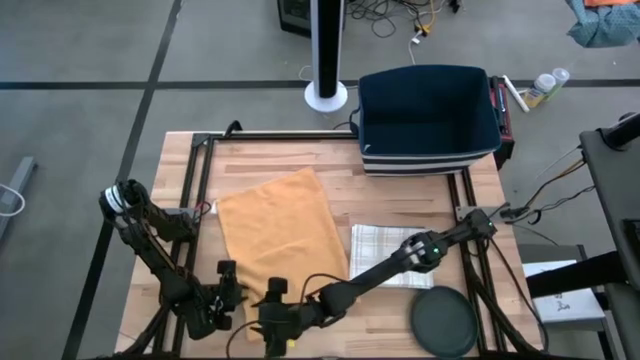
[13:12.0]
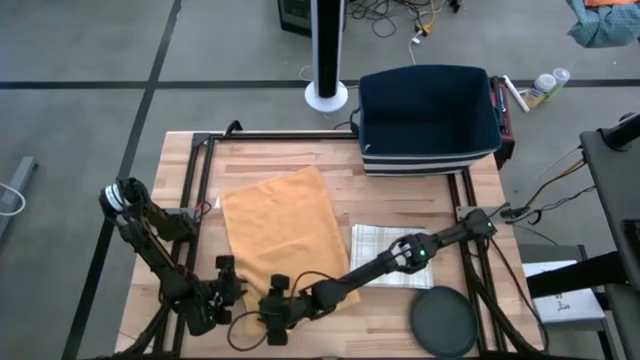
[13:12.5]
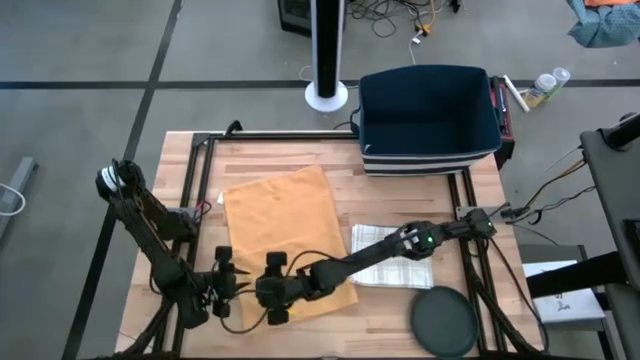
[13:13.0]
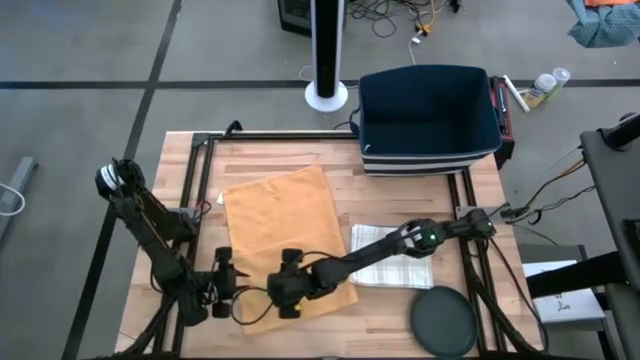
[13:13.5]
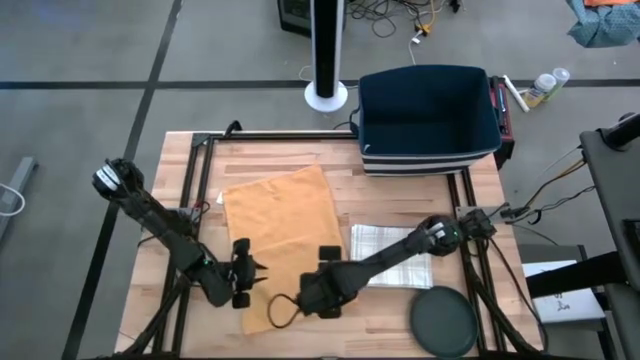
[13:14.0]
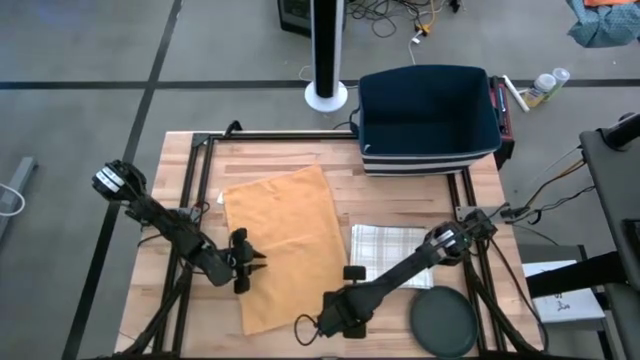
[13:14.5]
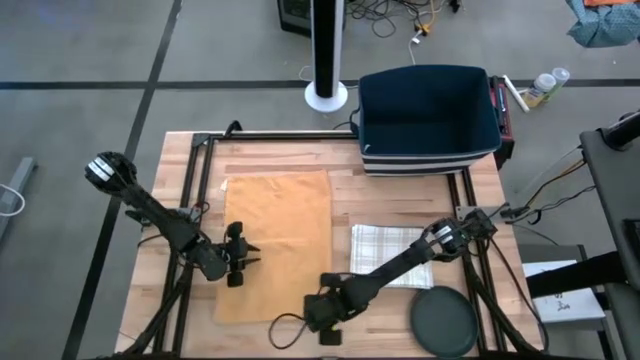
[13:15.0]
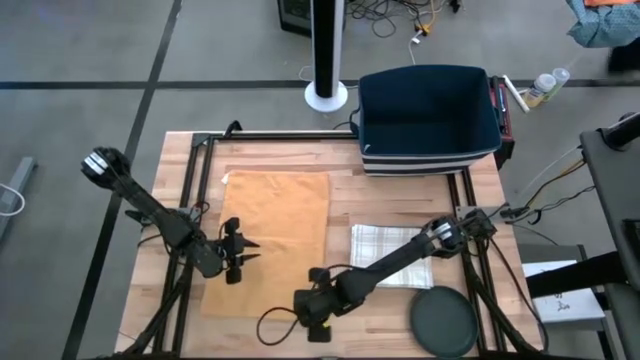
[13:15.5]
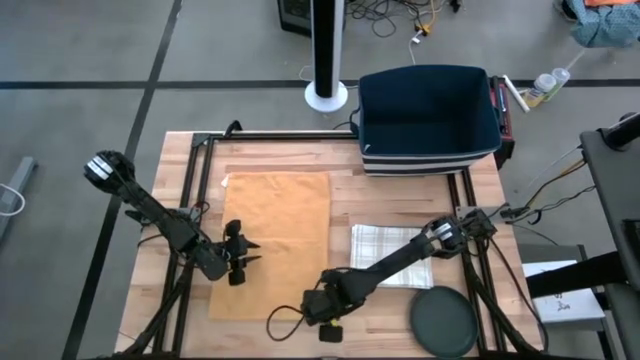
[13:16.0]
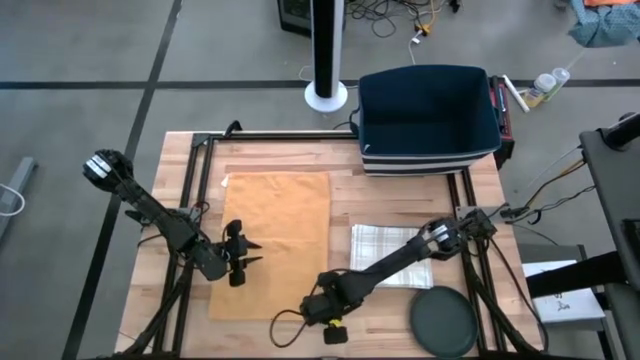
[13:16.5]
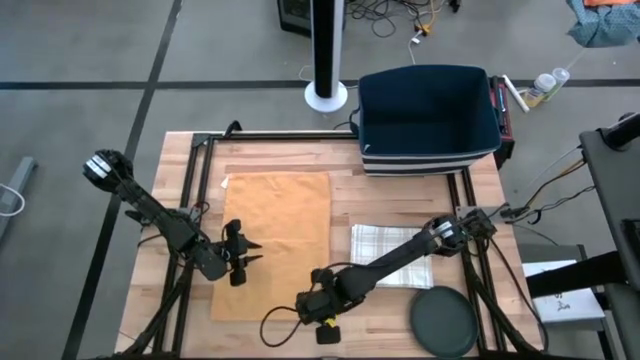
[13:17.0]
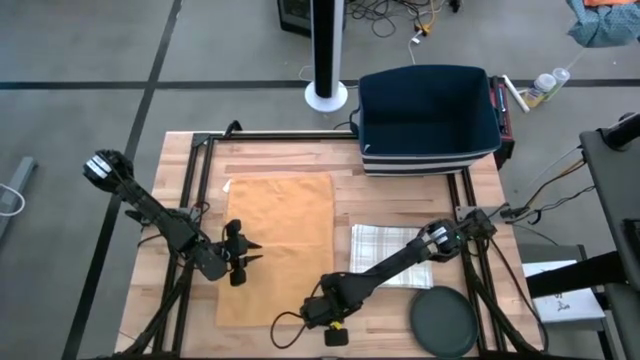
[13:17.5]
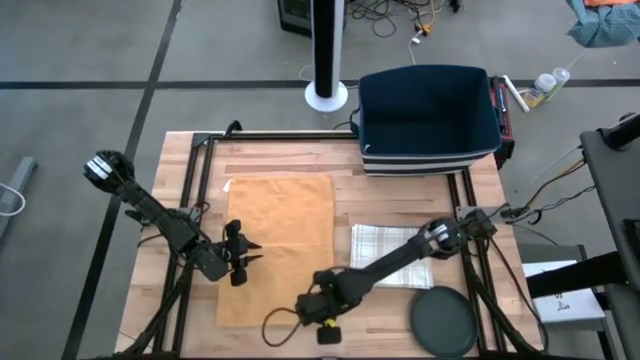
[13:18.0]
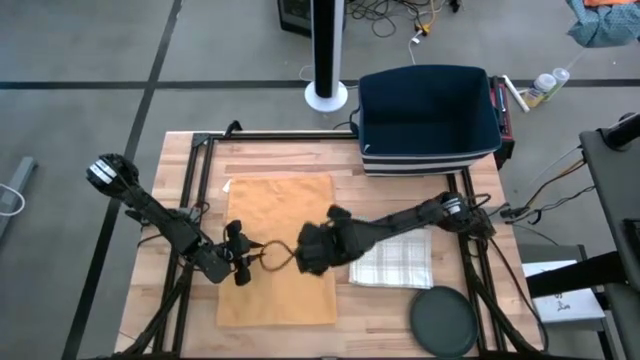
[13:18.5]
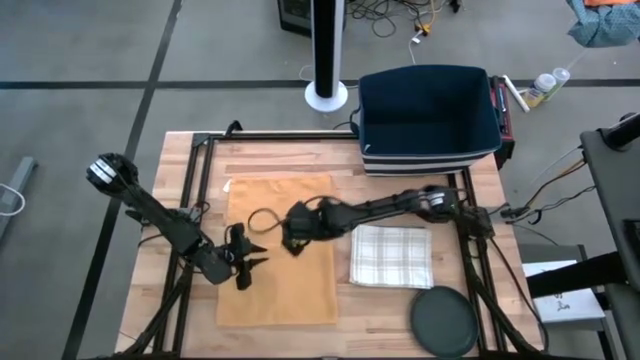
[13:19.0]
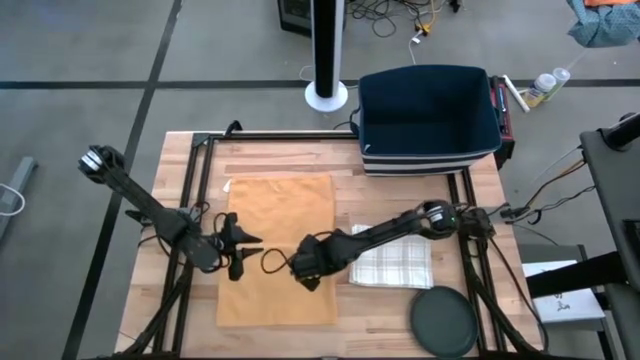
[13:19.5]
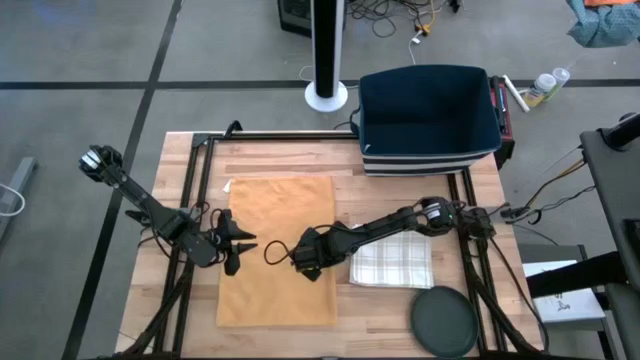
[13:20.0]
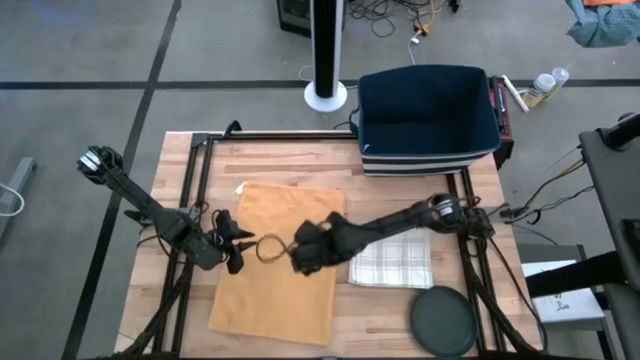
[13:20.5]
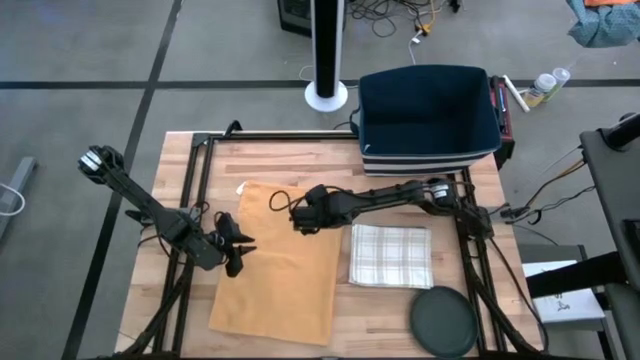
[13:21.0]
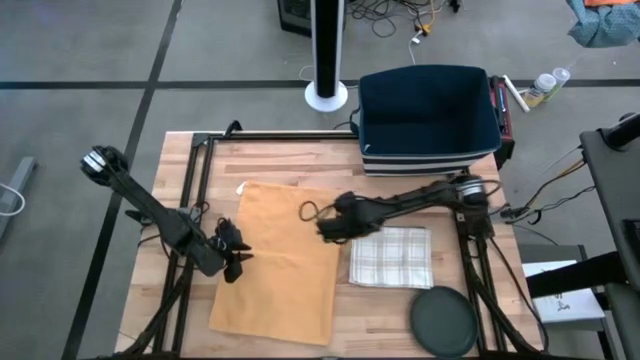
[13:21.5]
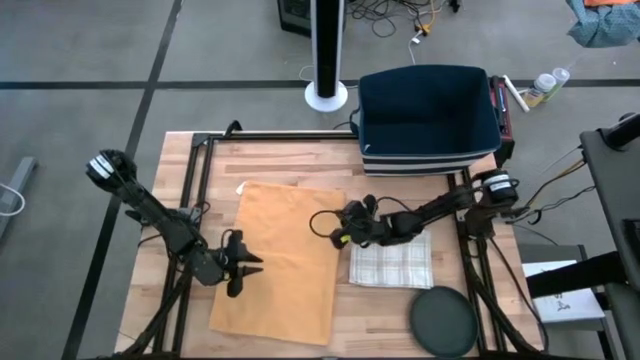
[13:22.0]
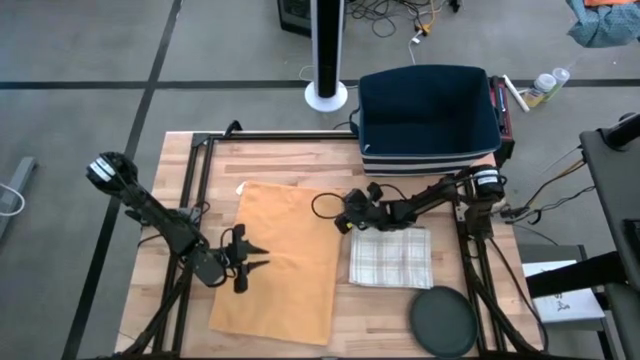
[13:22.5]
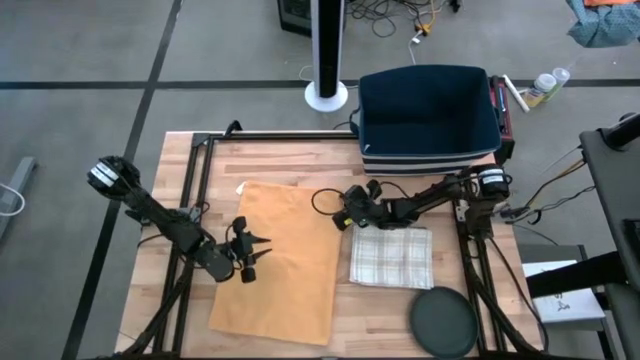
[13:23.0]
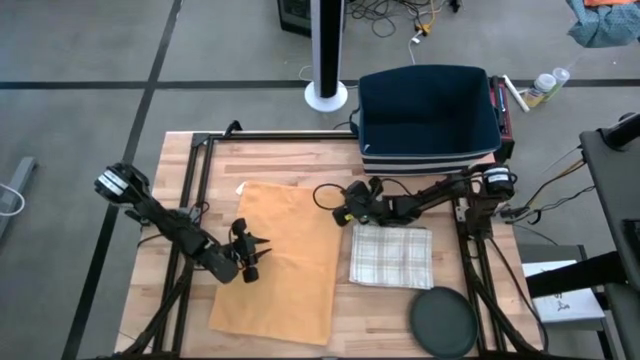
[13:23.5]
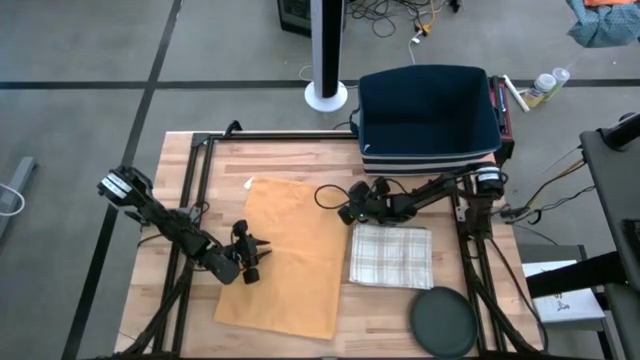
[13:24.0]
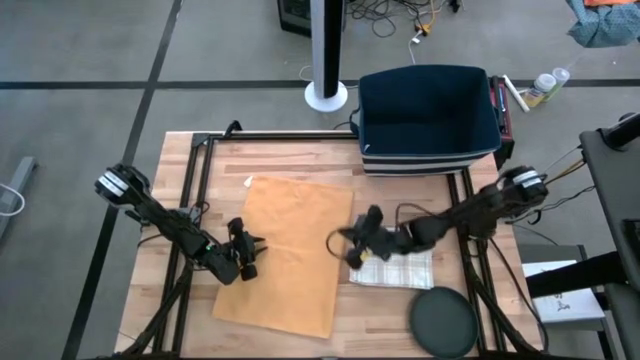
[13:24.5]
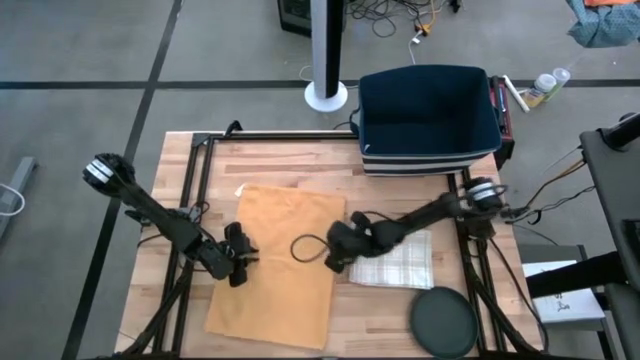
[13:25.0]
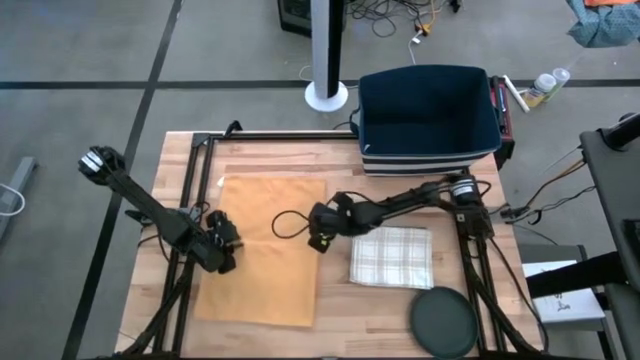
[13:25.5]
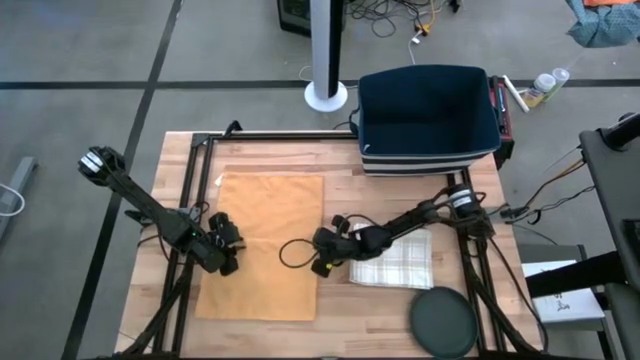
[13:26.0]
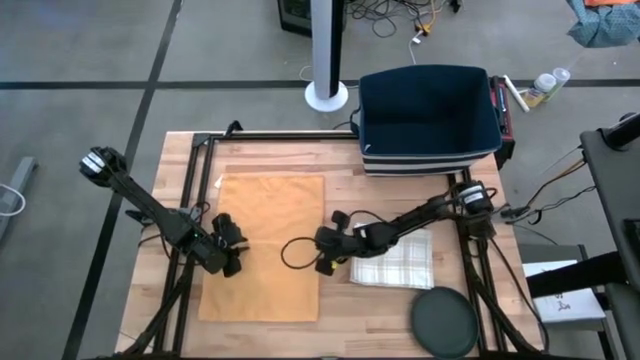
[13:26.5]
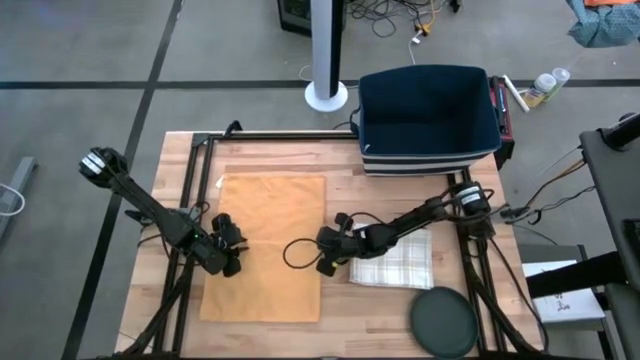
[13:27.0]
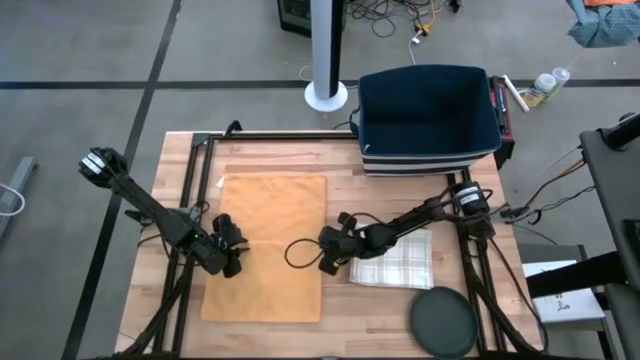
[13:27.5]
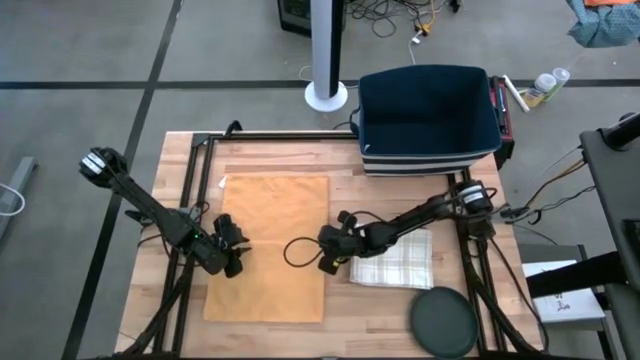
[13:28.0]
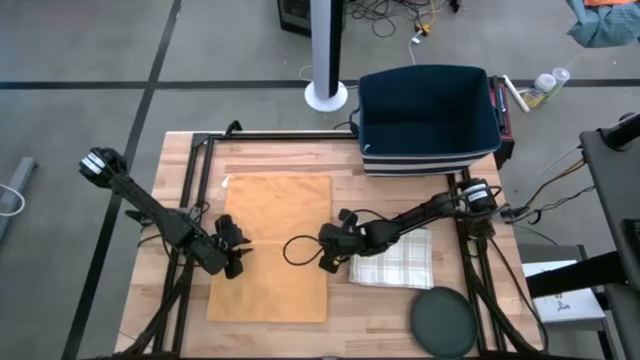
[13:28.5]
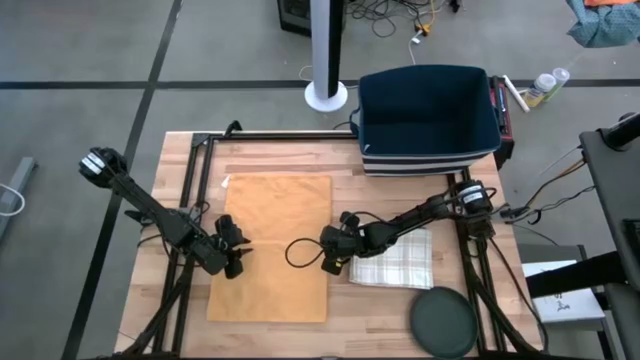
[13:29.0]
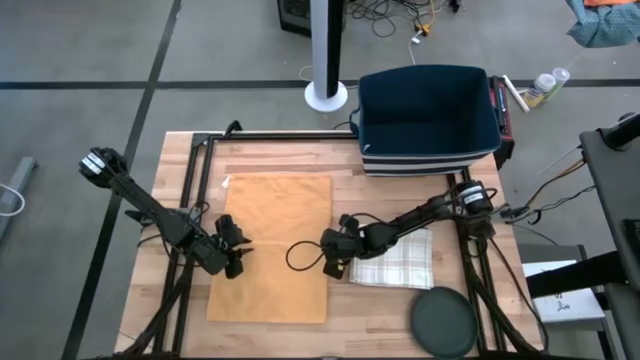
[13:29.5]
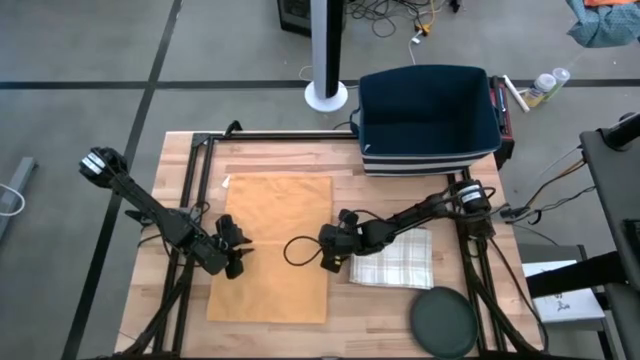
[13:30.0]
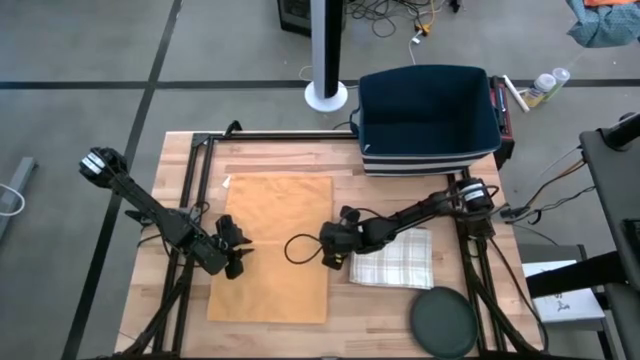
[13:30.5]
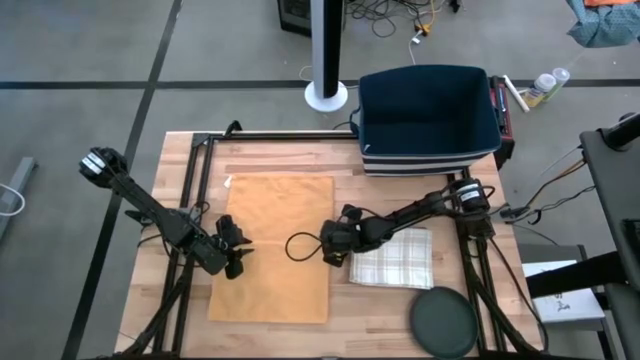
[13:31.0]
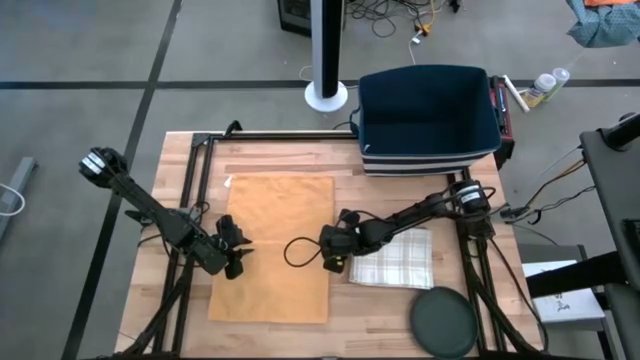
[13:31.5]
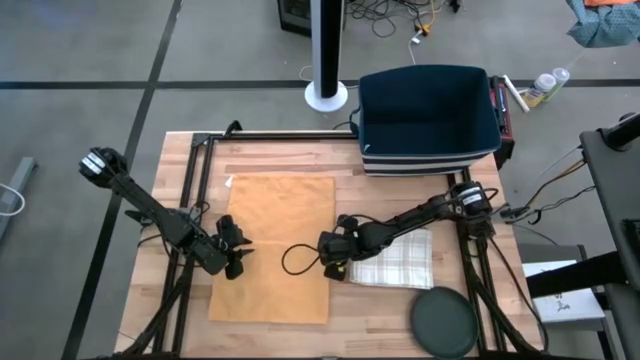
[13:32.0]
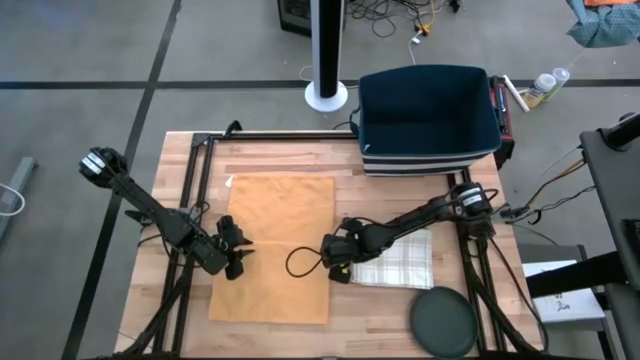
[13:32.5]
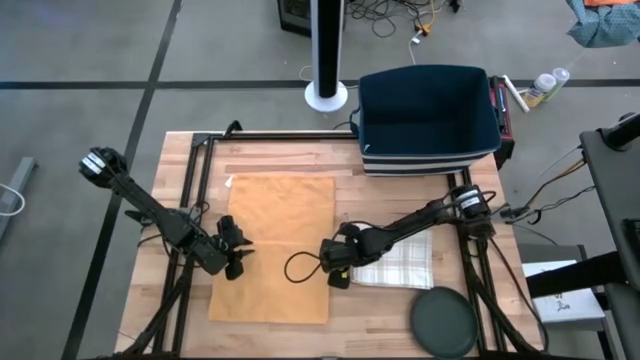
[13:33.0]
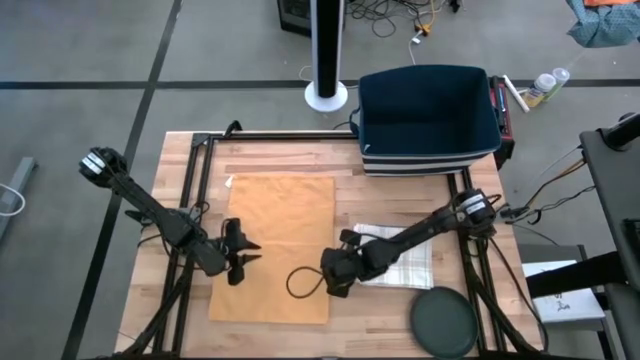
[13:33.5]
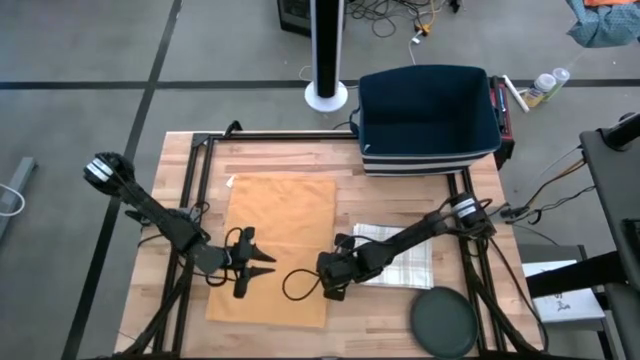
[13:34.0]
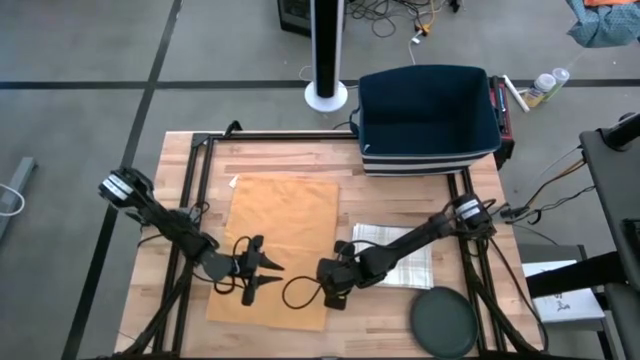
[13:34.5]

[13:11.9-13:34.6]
Task: Fold kitchen towel into neat rectangle
Fold the orange towel
